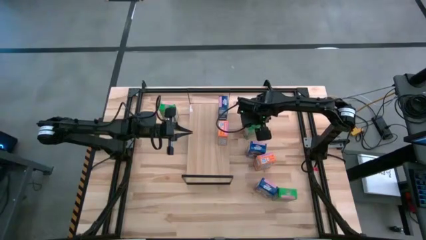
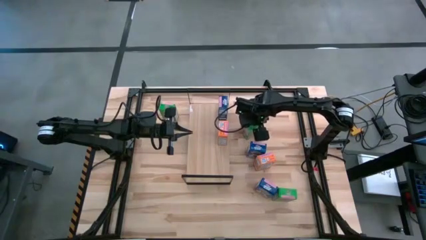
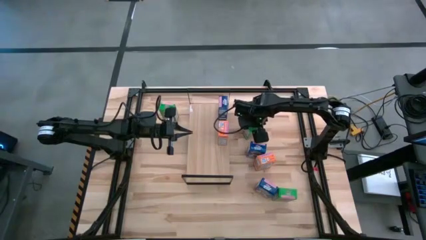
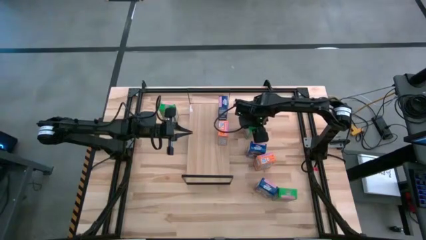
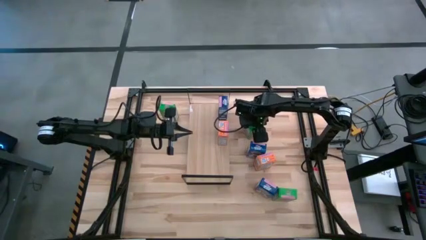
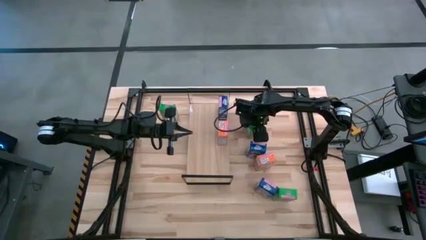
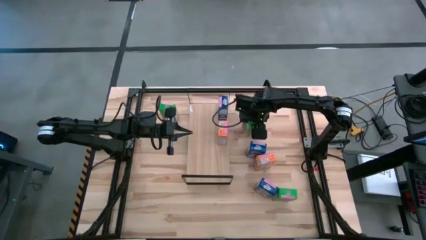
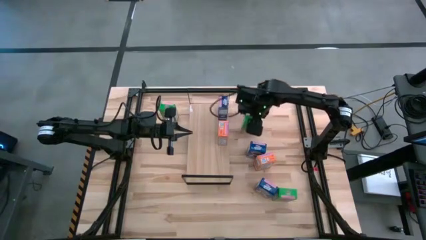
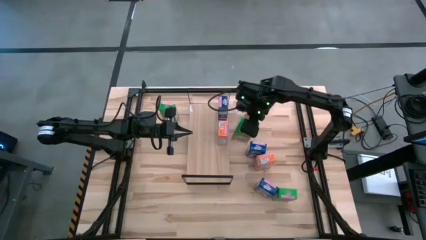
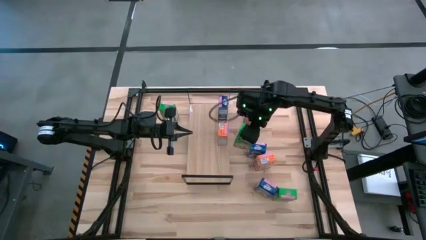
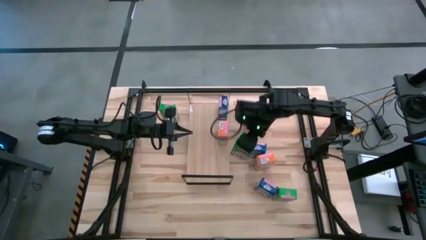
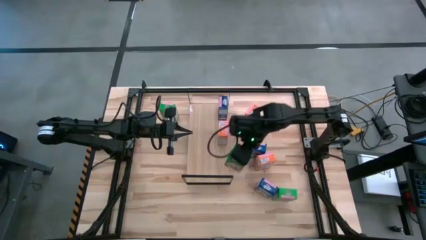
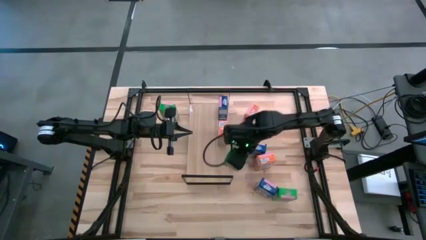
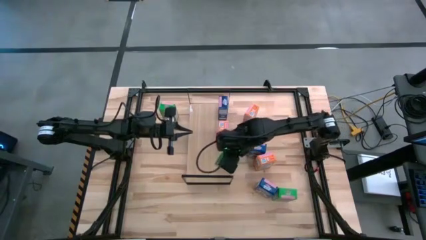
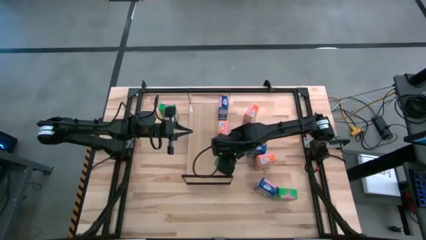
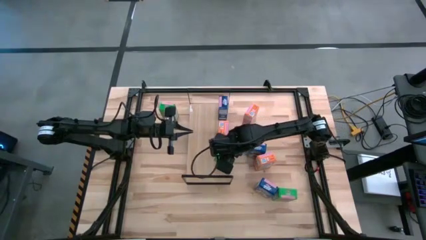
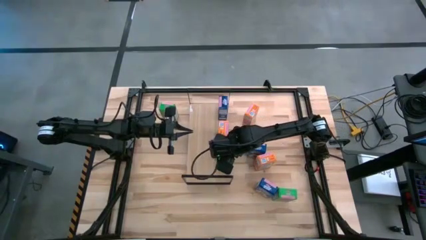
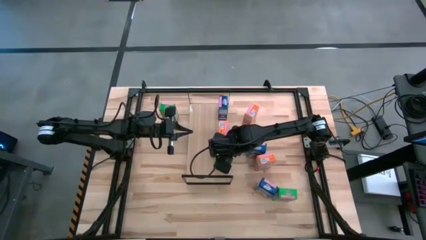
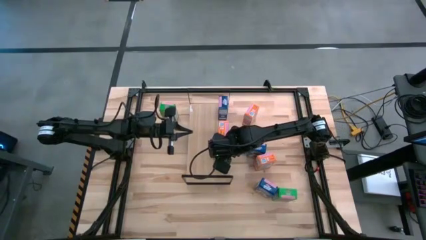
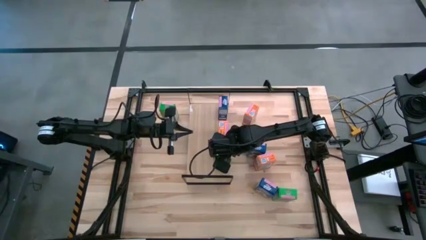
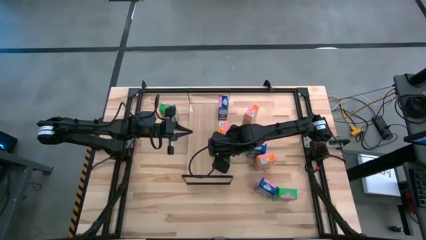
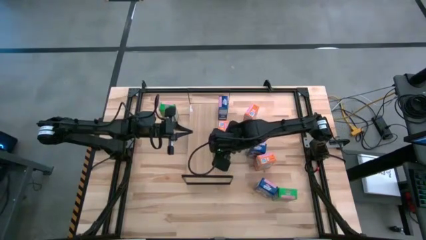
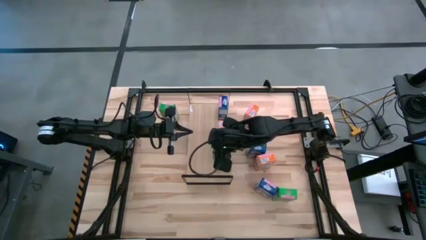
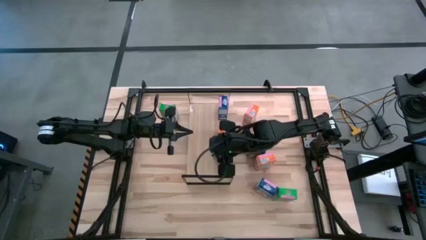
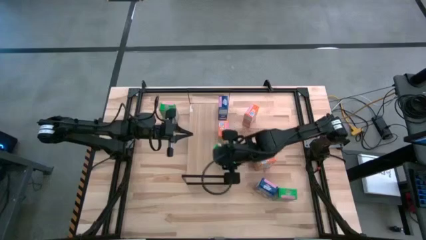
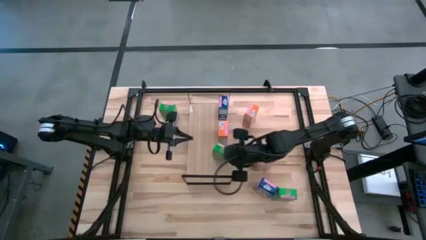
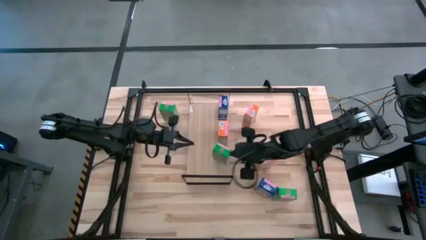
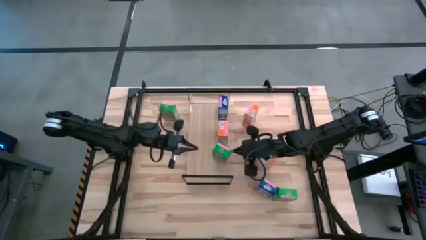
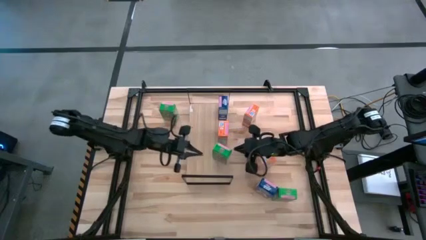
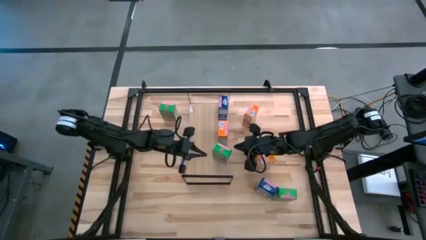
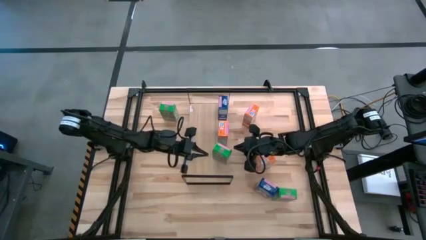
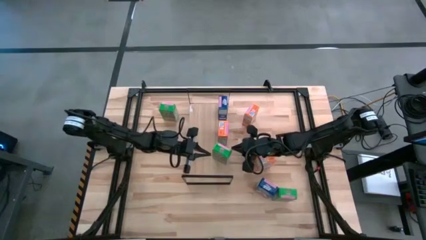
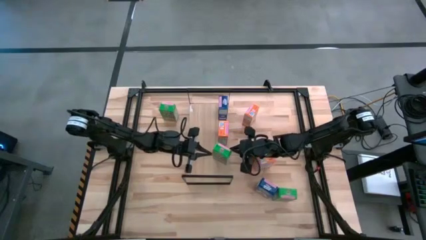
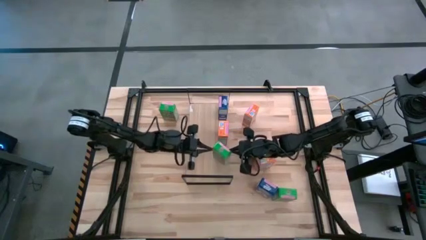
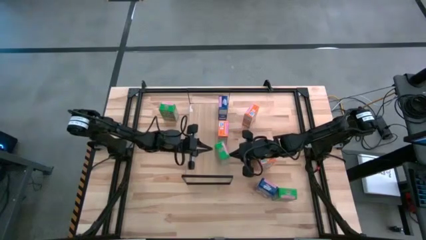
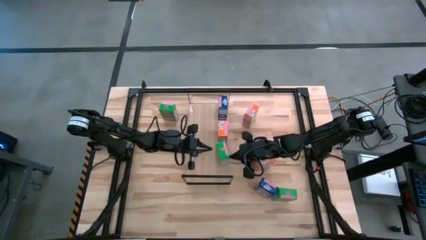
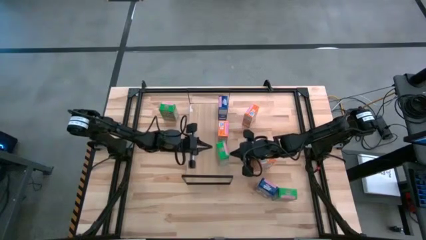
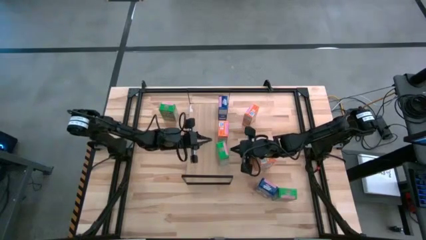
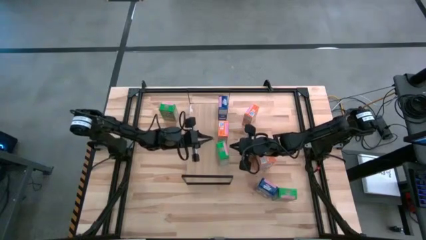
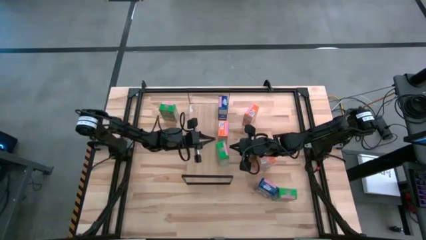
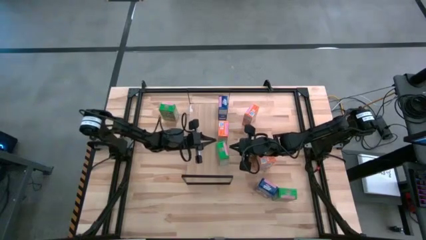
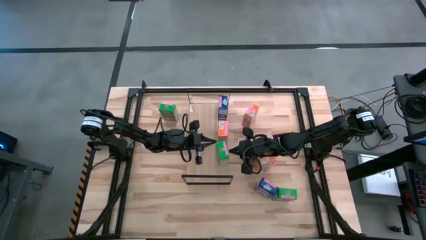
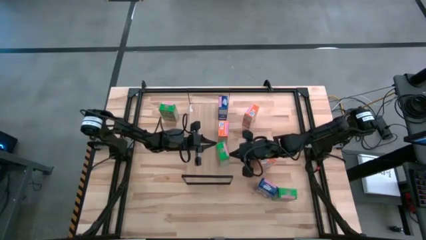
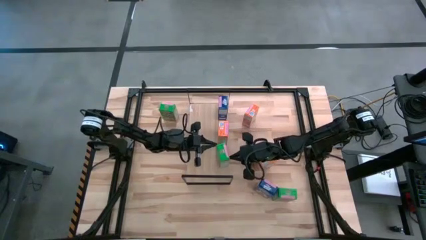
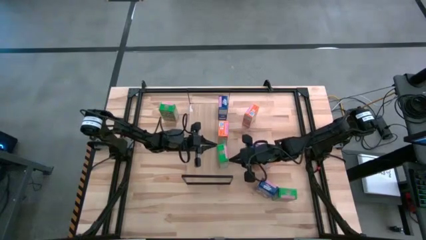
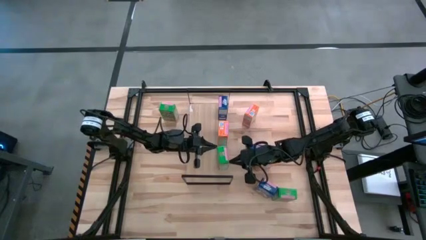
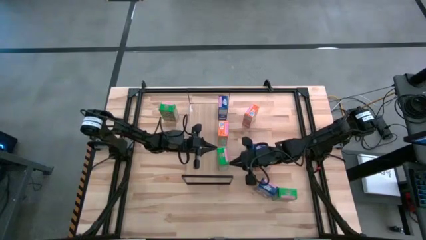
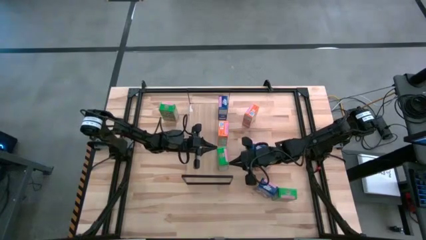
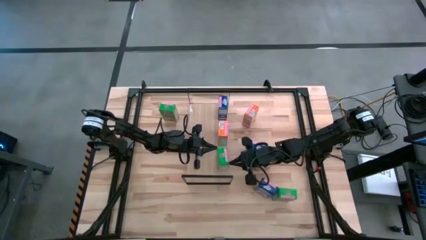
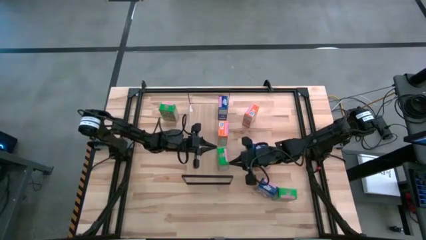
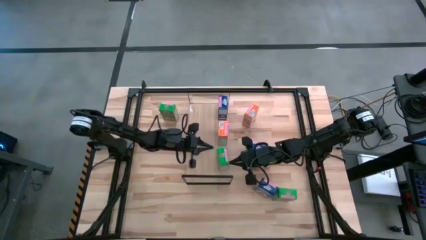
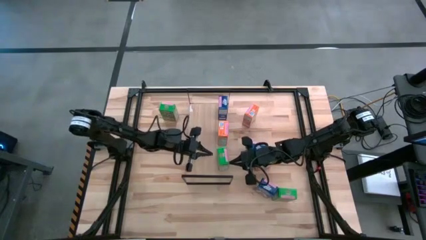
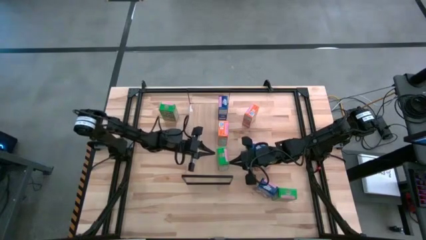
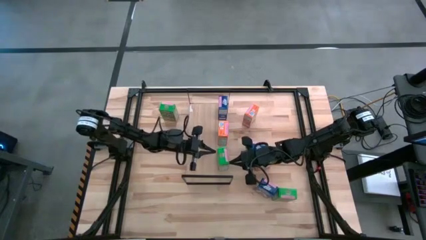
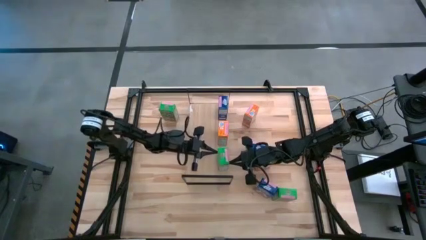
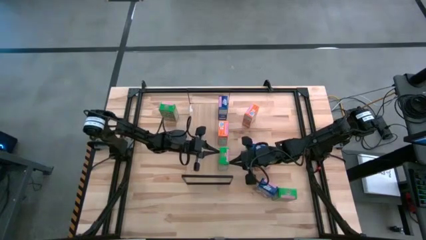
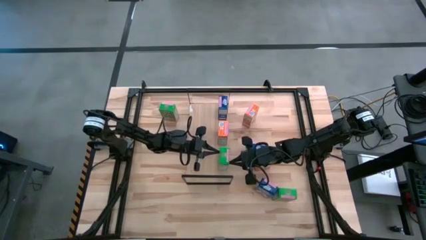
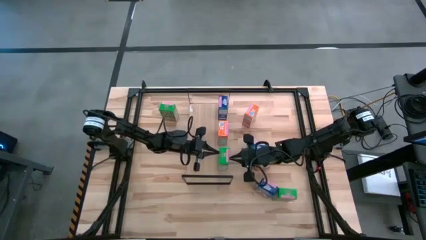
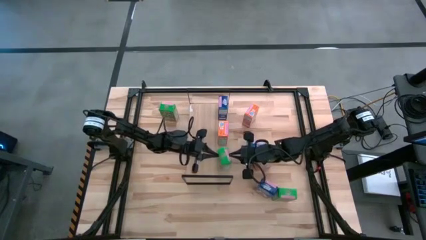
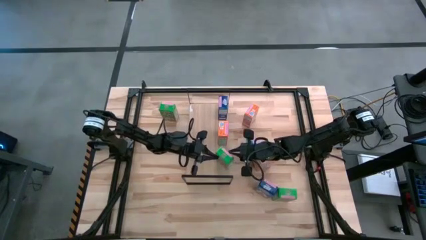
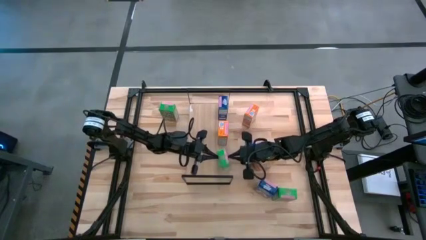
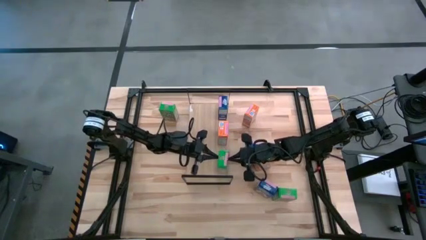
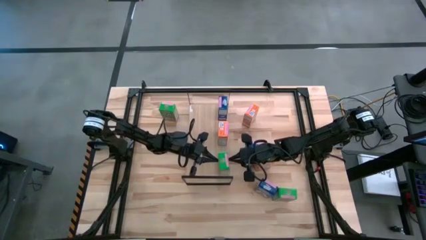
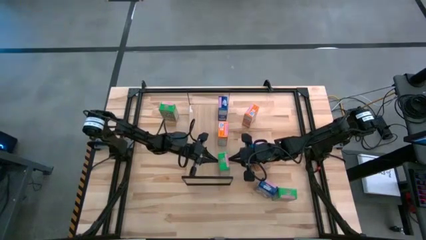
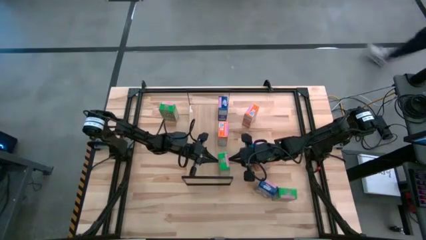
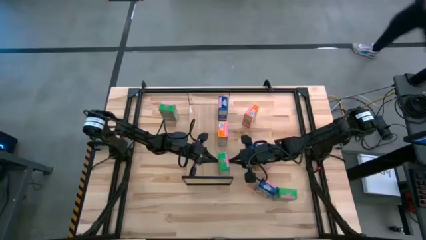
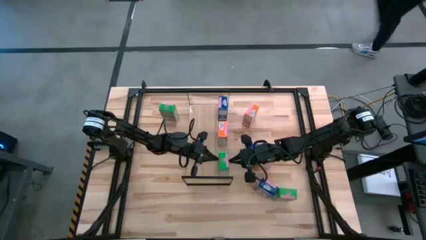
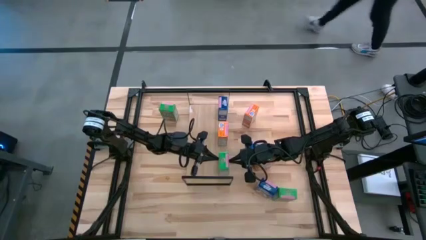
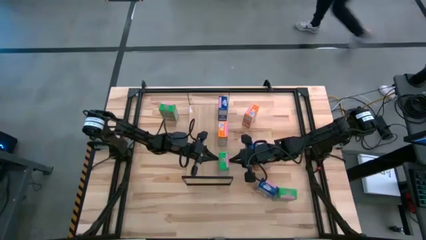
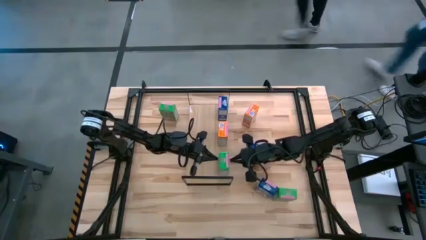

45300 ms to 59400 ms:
Task: Stack cereal on shelf
Put the top right green cereal box on the shelf

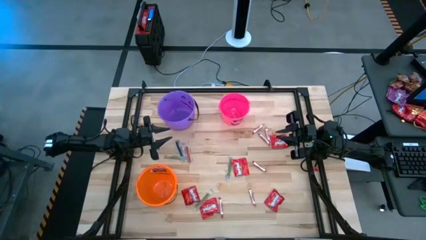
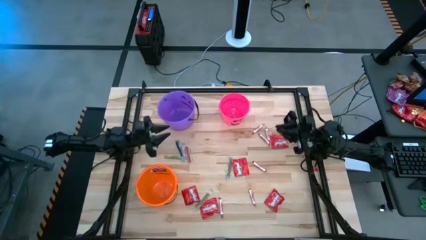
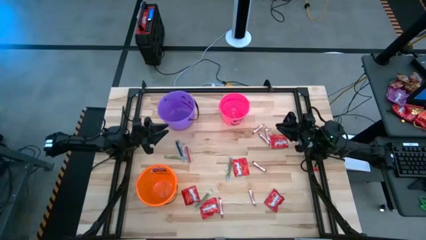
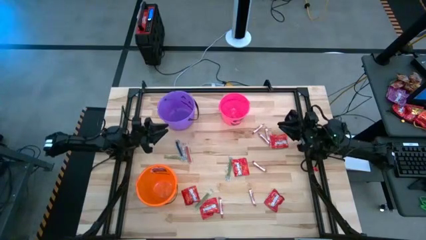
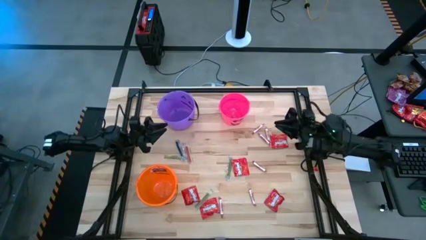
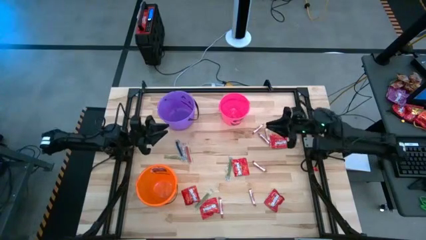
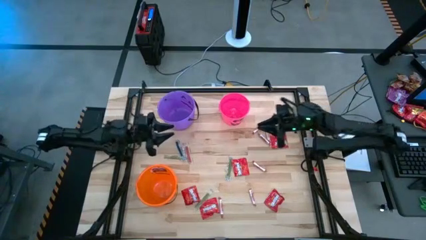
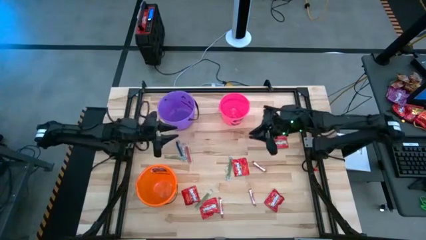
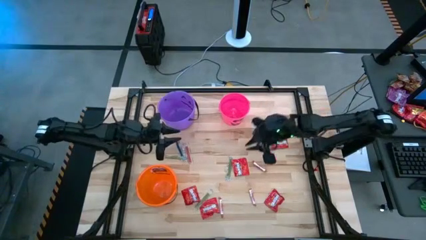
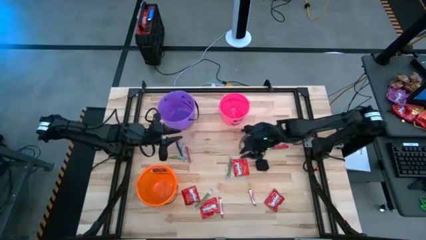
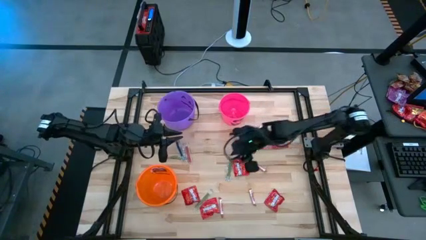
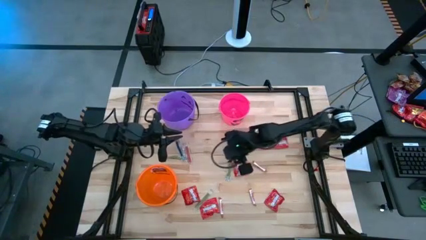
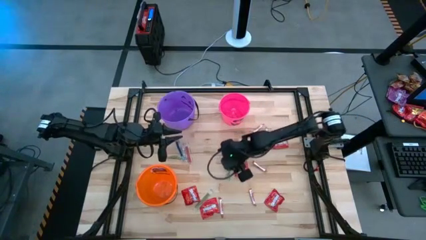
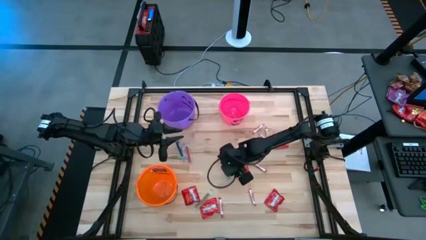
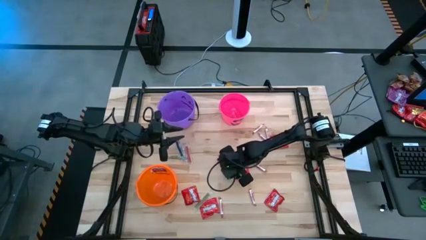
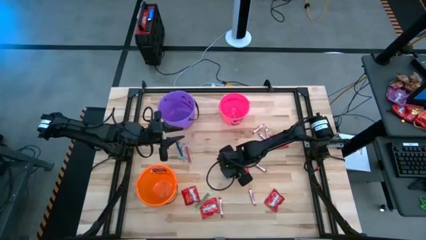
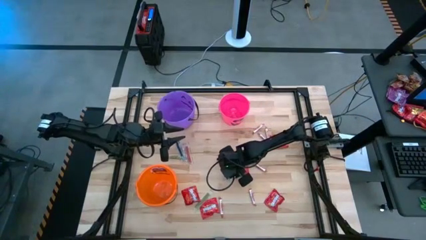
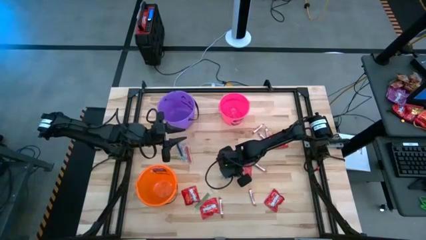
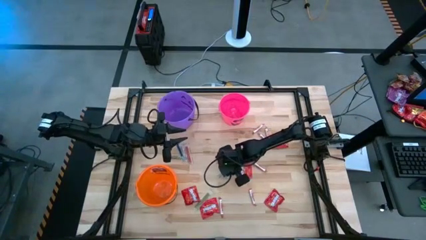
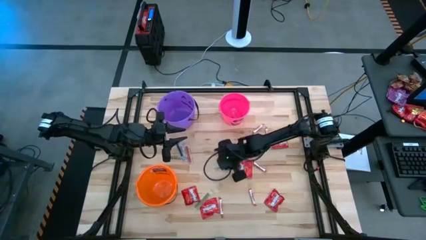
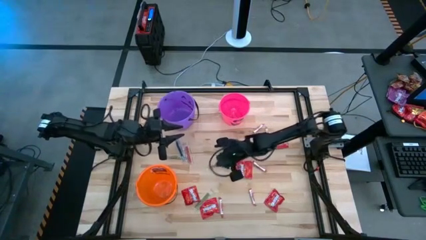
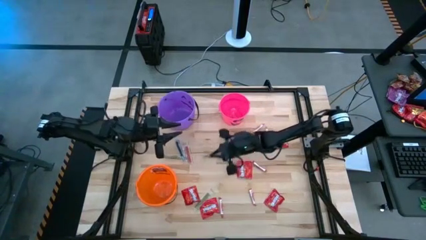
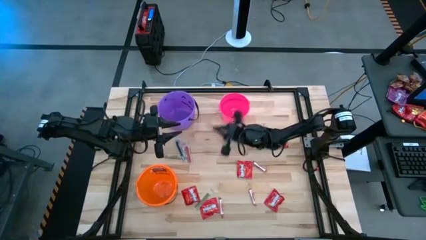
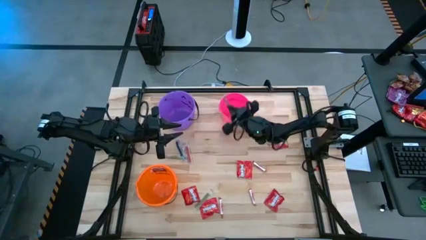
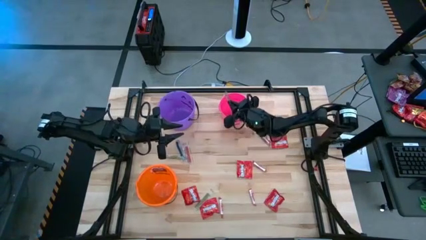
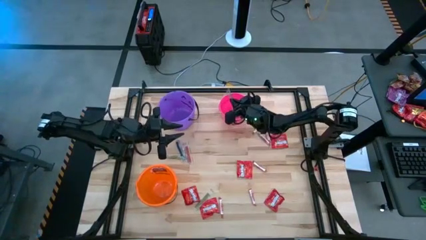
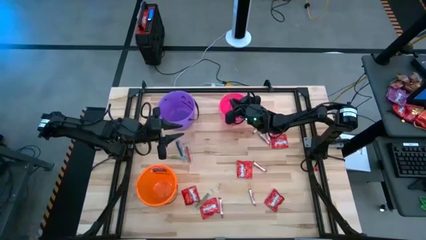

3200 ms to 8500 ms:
Task: Sort candy by brand, put in halloween buckets
Put the transparent green candy into the pink bucket
